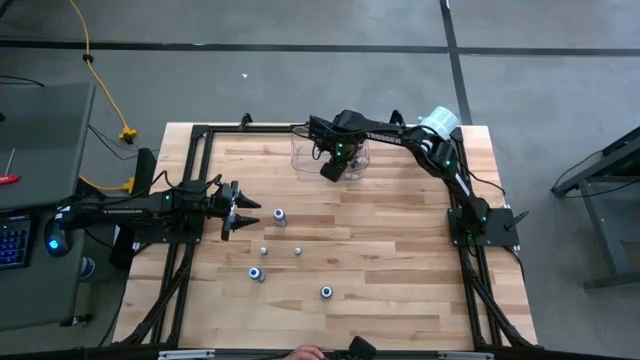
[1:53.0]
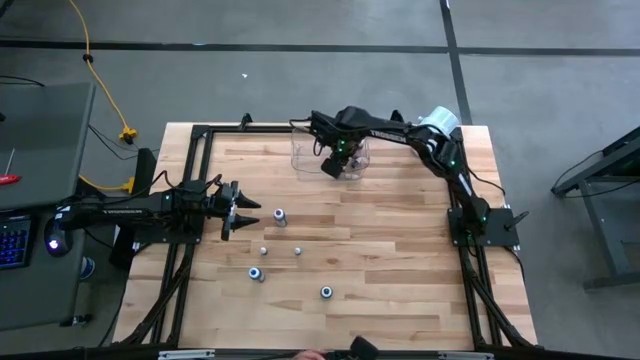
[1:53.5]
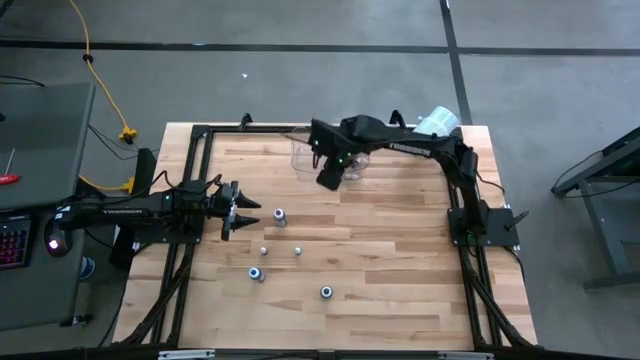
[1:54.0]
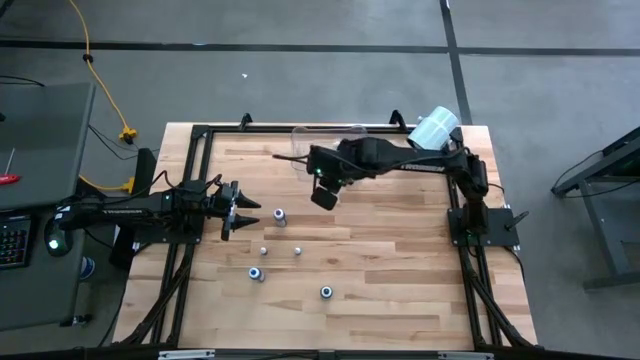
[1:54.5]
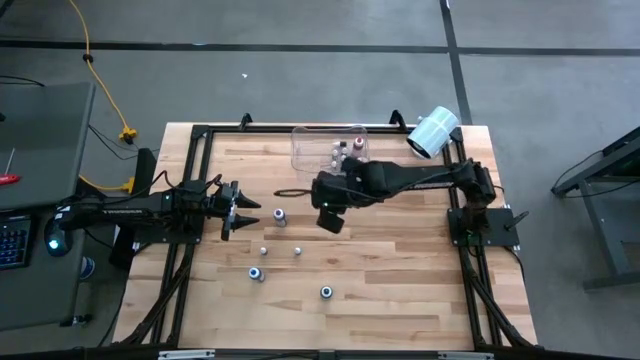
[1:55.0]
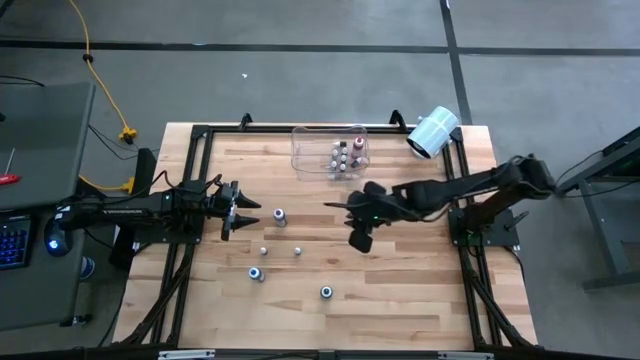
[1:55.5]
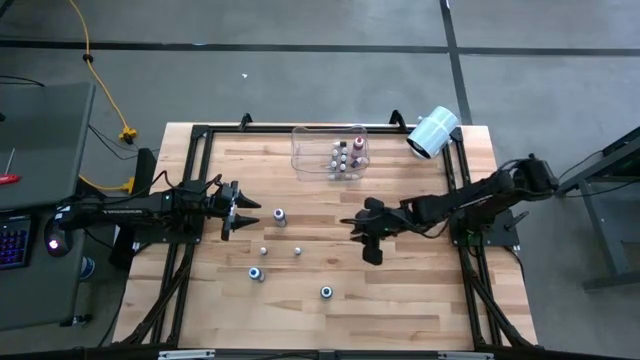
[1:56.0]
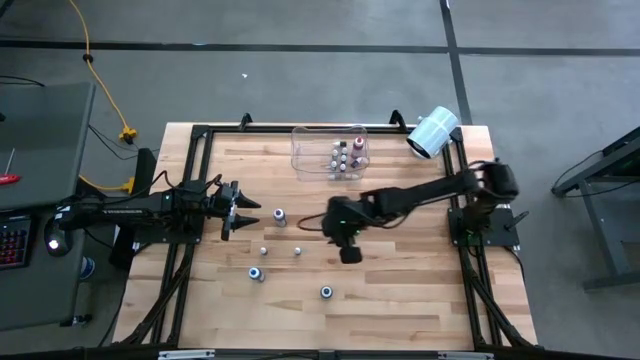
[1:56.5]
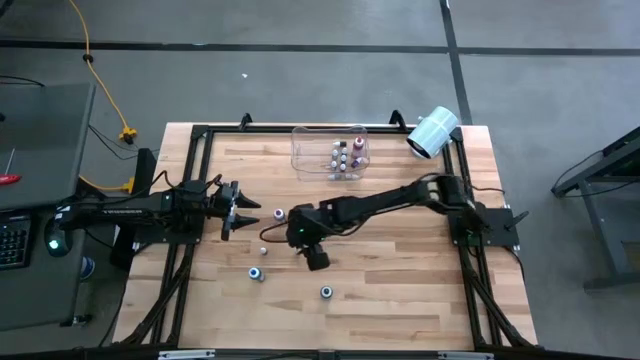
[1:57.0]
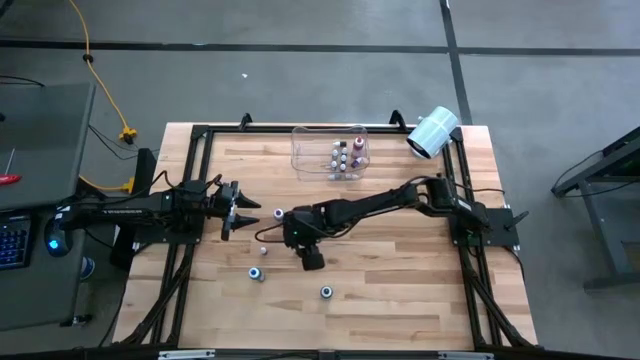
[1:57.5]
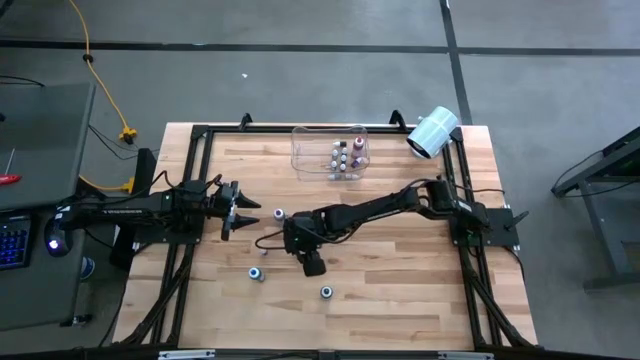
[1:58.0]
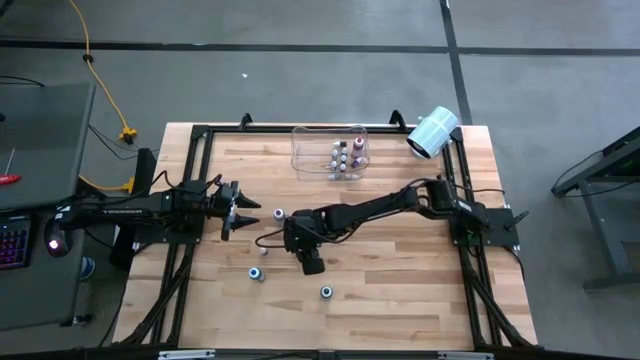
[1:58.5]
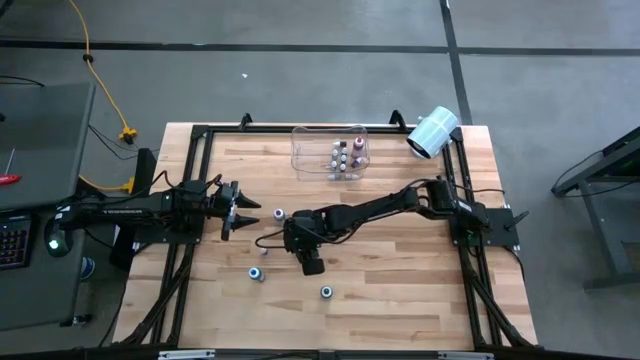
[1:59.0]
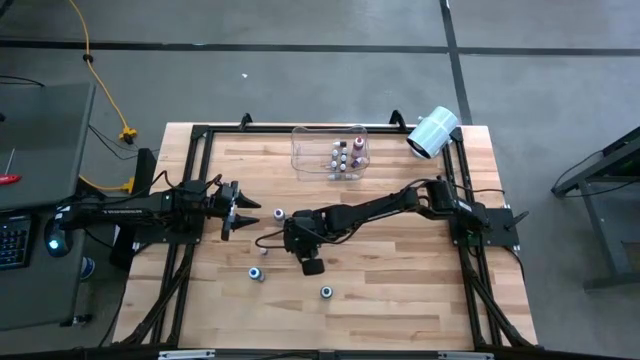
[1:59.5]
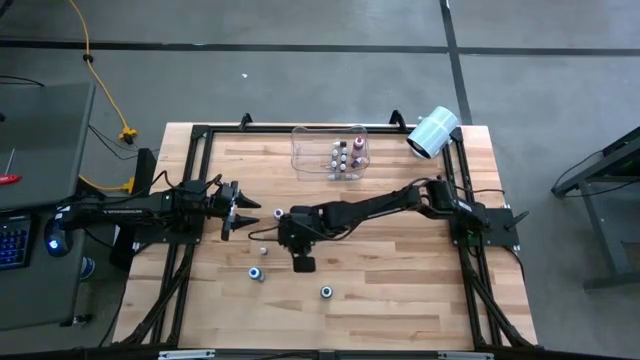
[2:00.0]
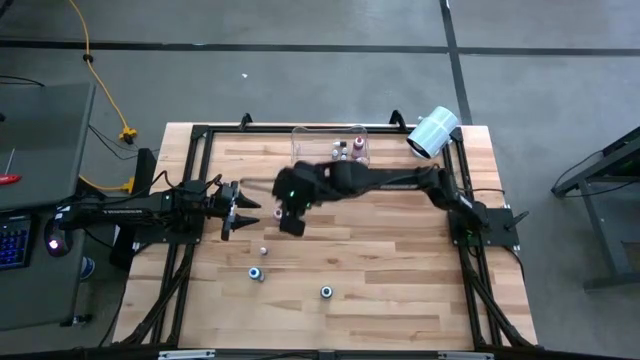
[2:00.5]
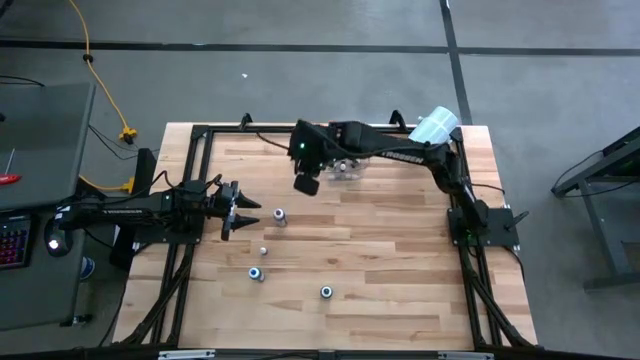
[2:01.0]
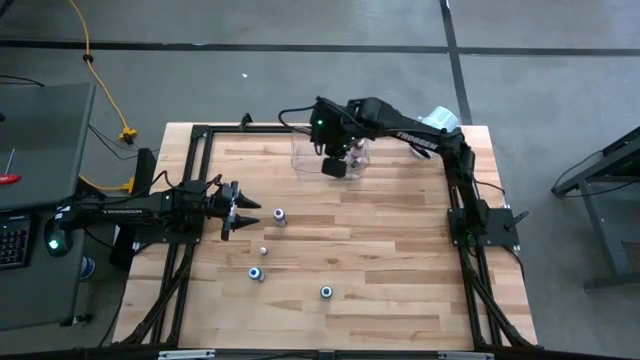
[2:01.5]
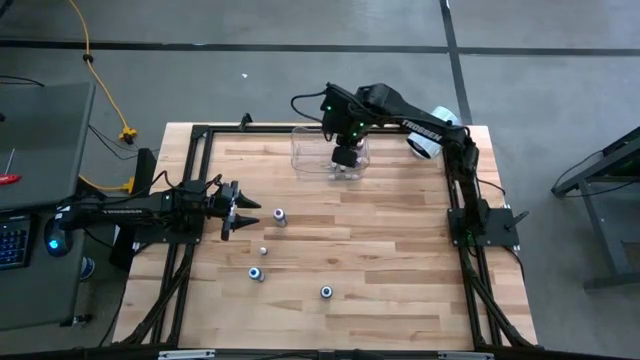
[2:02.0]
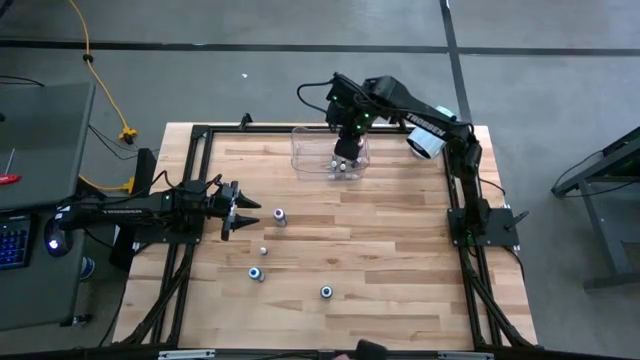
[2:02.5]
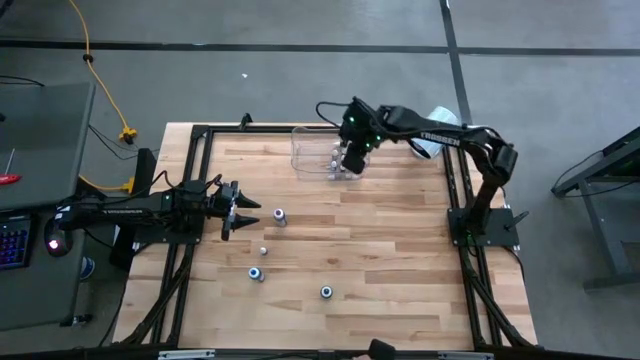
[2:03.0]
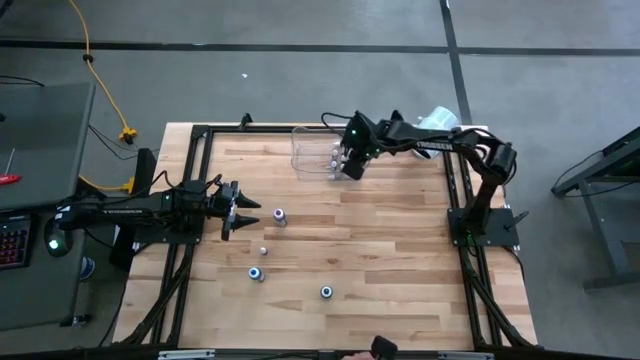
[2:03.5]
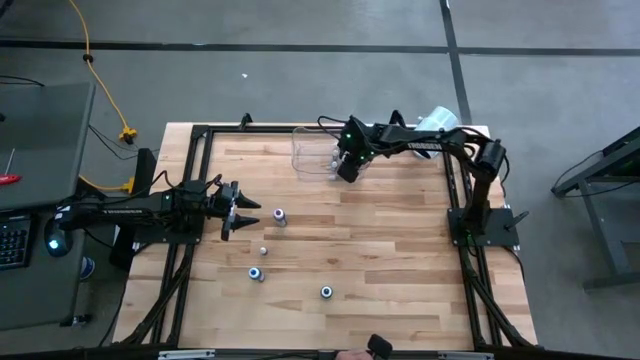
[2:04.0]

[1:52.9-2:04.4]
Task: Pick & Place food coloring
Put the small black food coloring into the transparent container

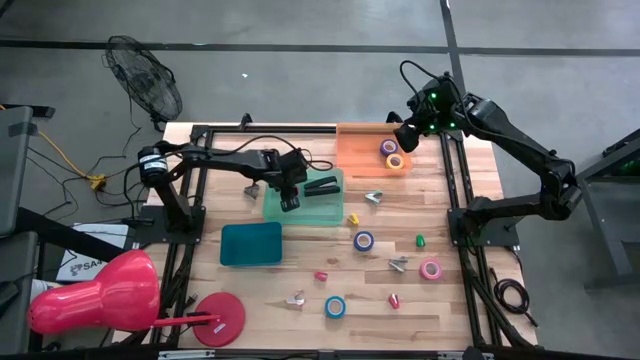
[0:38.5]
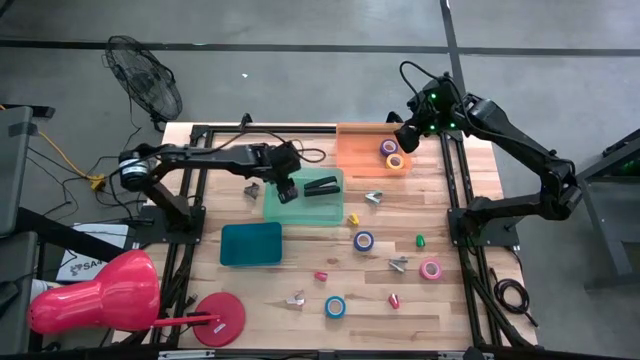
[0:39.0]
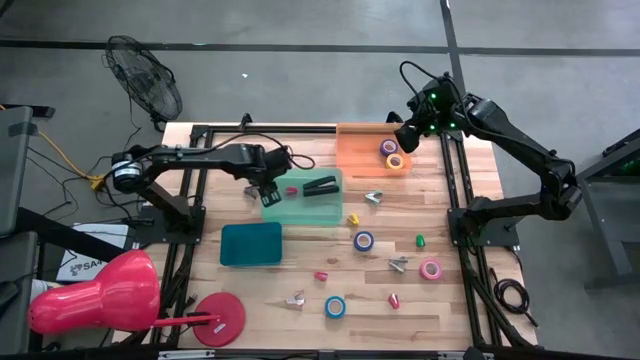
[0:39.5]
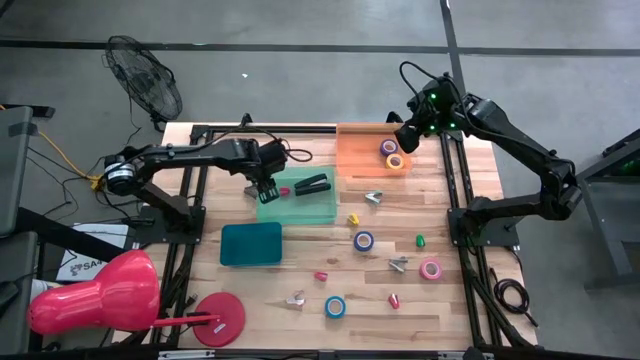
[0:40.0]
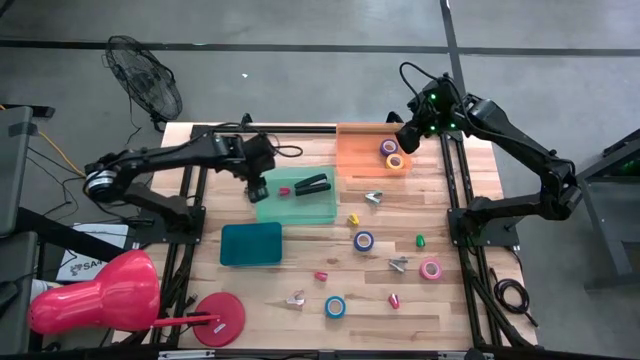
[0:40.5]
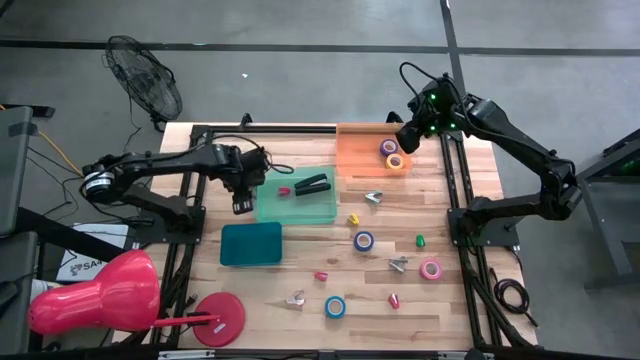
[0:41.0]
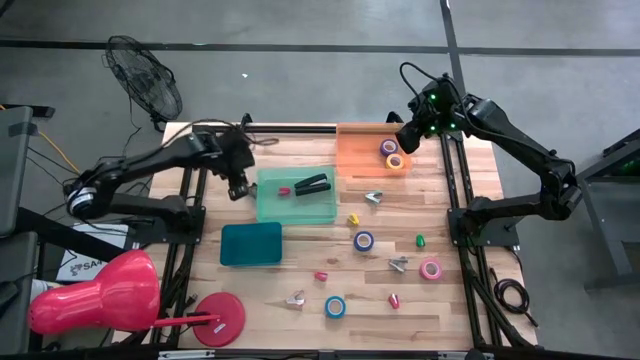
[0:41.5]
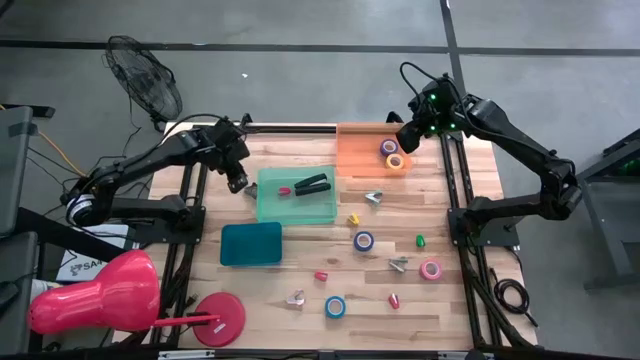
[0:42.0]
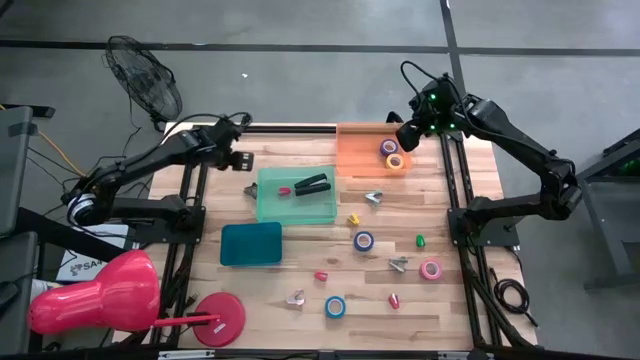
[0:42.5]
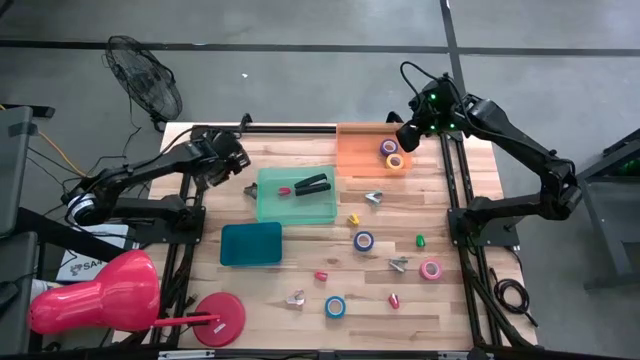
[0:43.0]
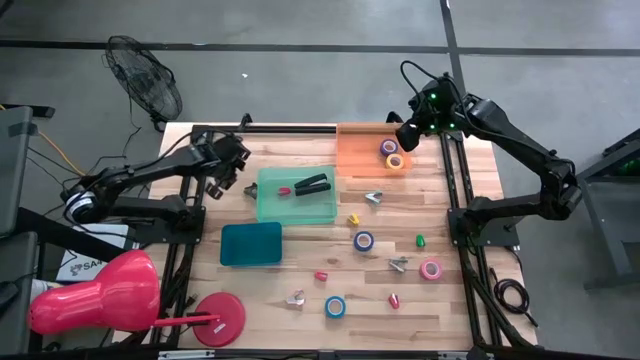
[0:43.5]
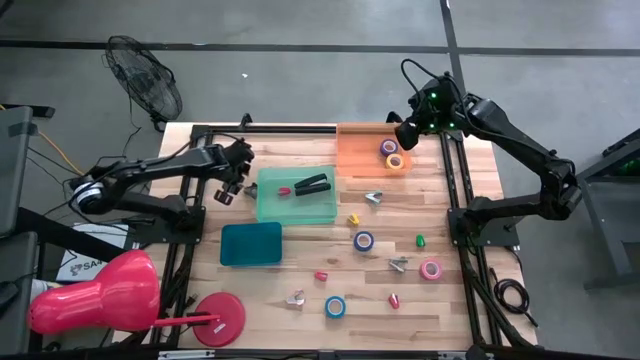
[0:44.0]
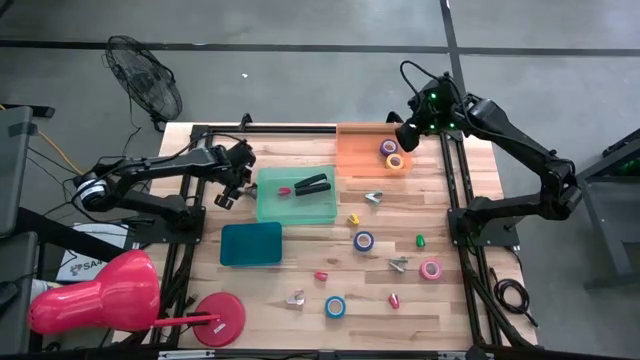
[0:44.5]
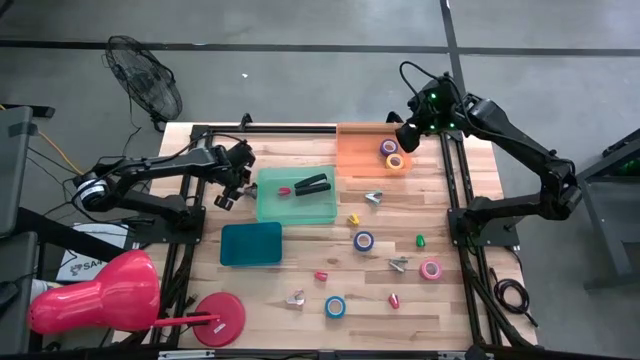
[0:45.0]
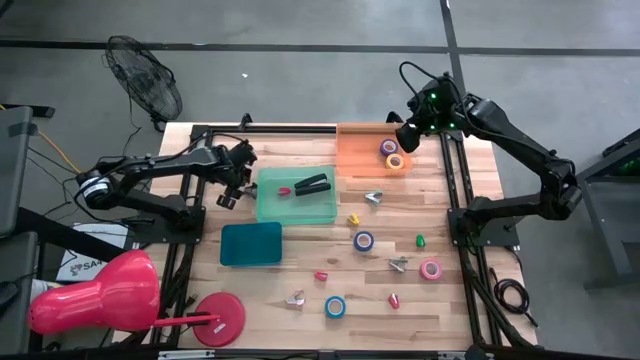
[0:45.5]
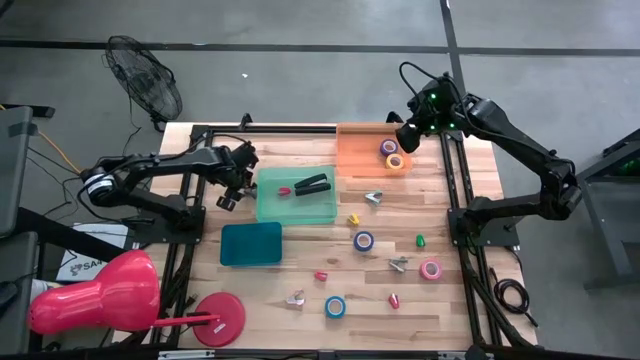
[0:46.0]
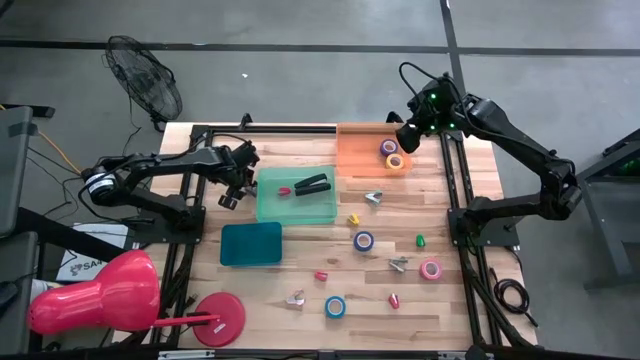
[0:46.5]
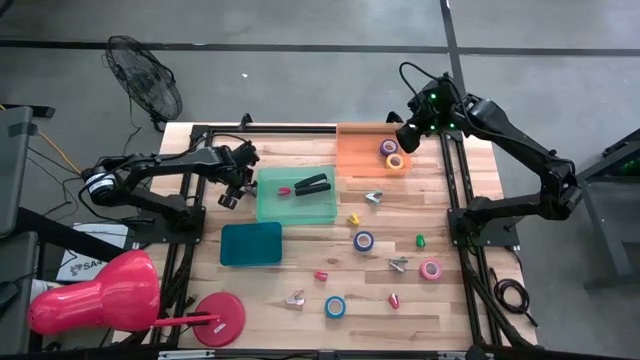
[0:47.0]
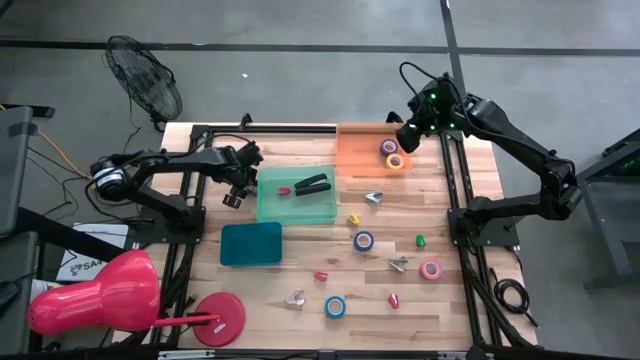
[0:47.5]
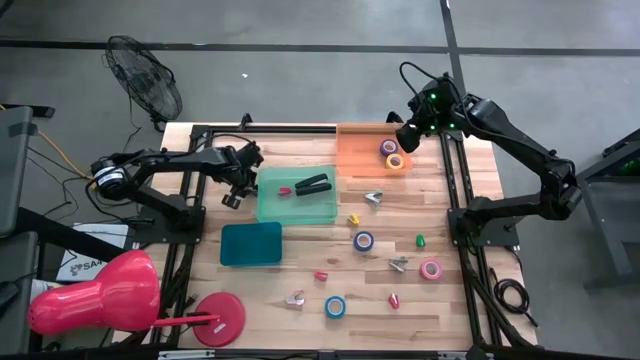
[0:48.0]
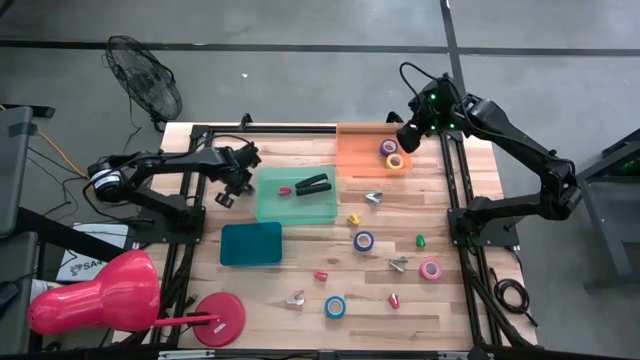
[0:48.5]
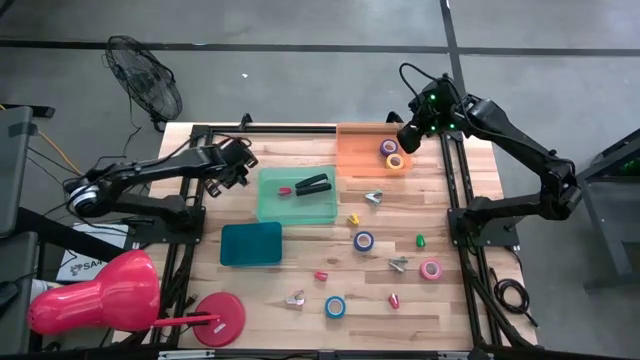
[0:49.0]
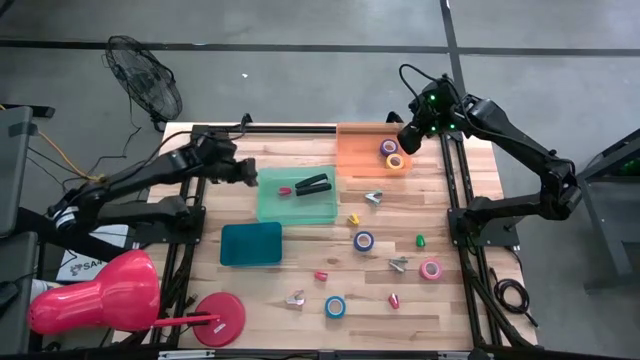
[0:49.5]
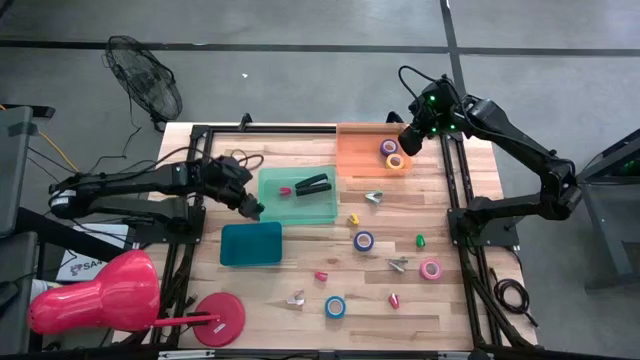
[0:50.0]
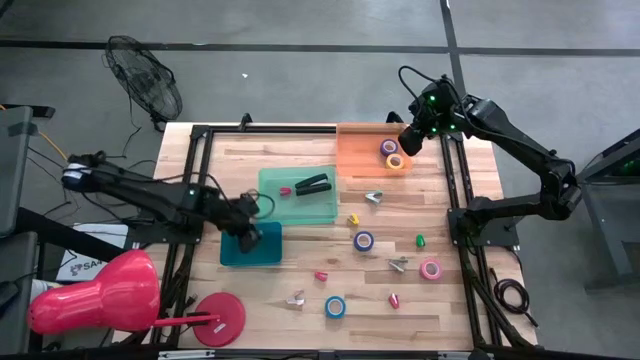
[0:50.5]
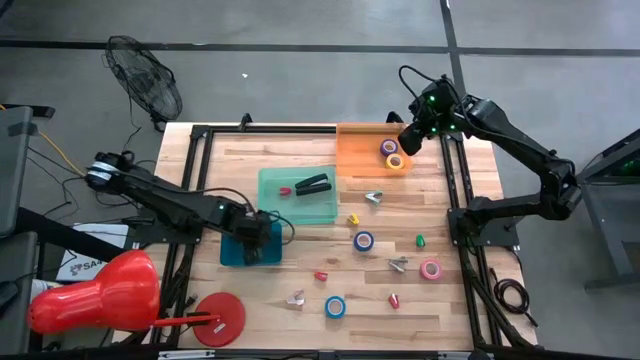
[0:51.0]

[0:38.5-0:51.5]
Task: Pick and place Stapler, Stapler remover, tape
Put the black staple remover in the blue bin
